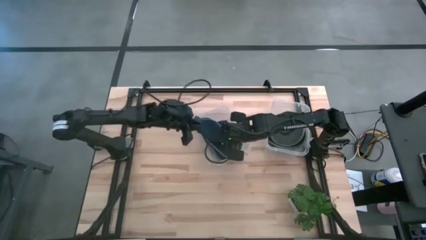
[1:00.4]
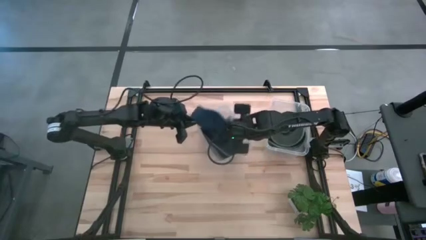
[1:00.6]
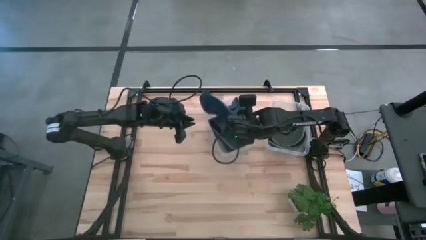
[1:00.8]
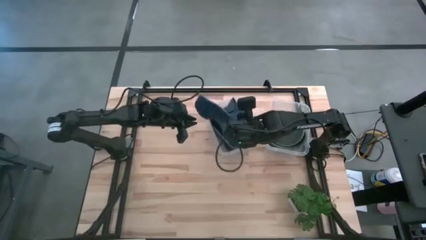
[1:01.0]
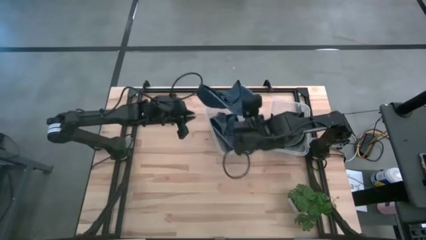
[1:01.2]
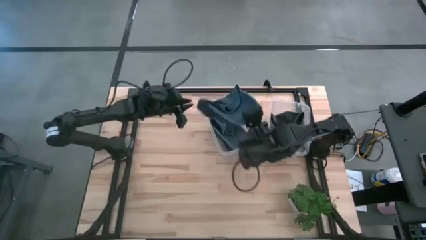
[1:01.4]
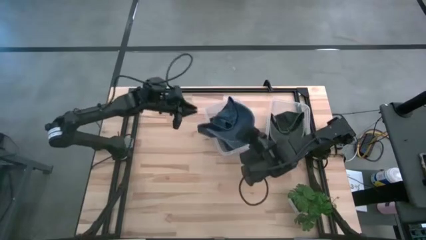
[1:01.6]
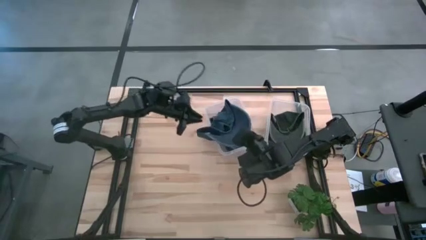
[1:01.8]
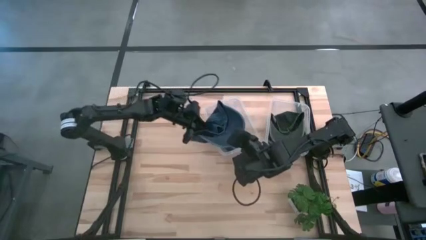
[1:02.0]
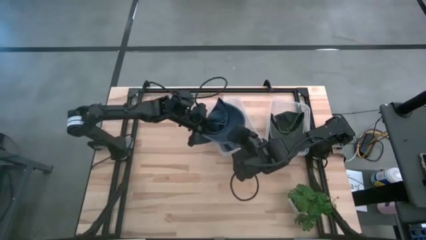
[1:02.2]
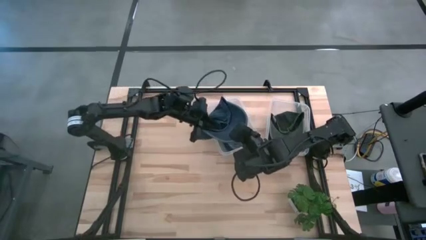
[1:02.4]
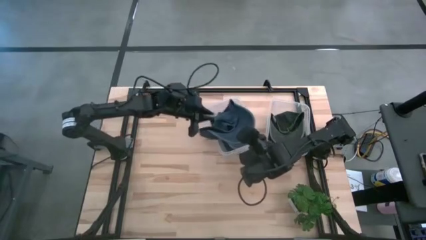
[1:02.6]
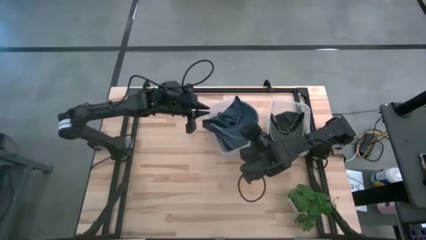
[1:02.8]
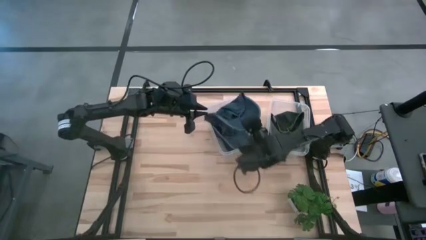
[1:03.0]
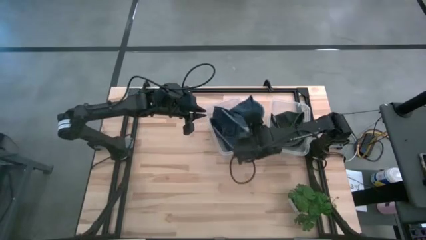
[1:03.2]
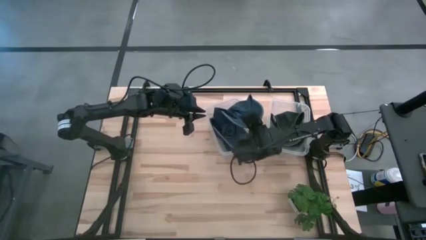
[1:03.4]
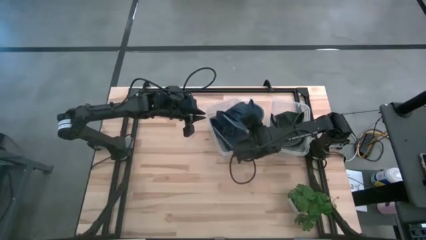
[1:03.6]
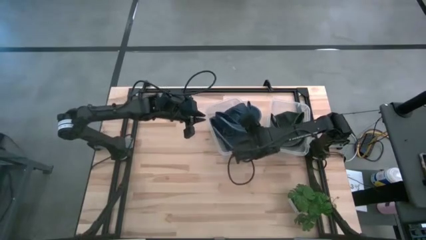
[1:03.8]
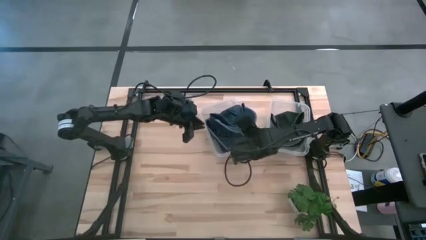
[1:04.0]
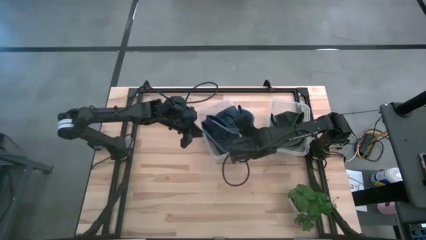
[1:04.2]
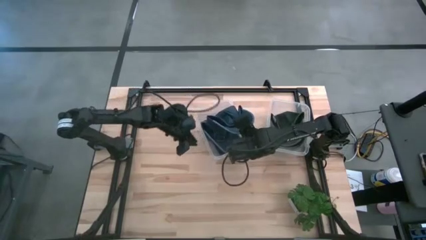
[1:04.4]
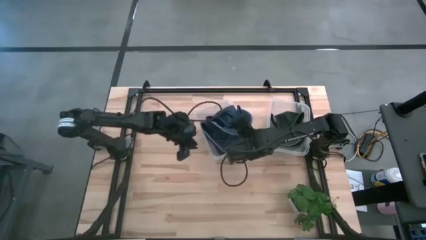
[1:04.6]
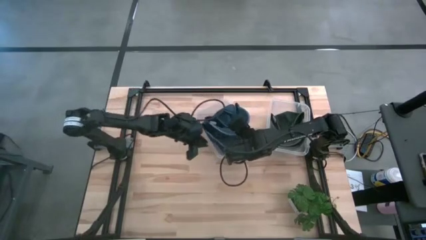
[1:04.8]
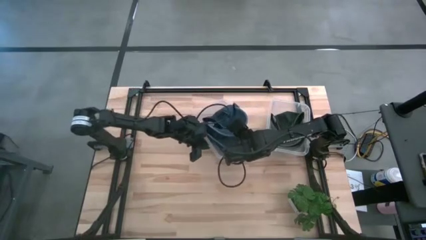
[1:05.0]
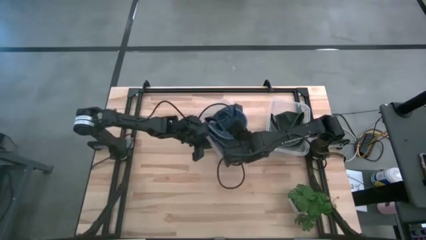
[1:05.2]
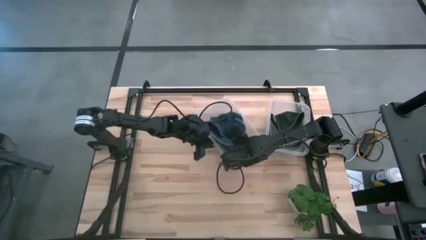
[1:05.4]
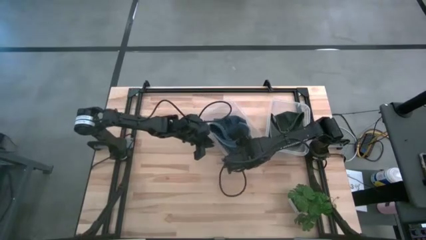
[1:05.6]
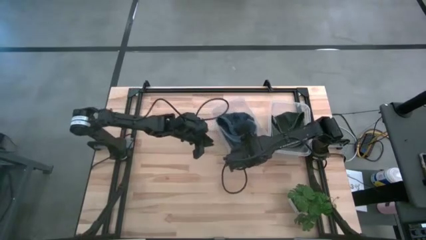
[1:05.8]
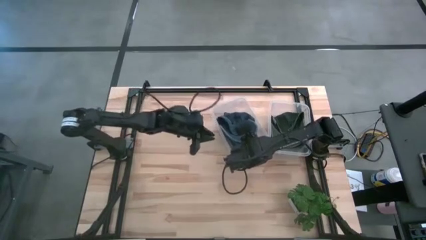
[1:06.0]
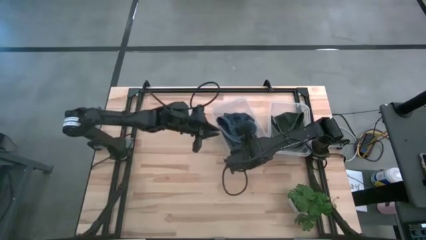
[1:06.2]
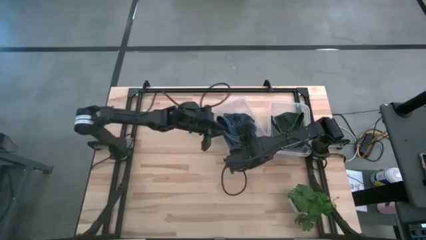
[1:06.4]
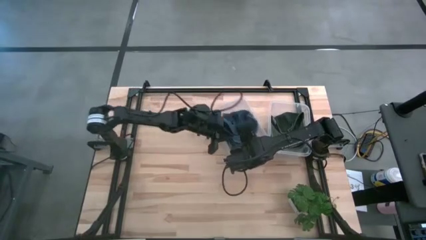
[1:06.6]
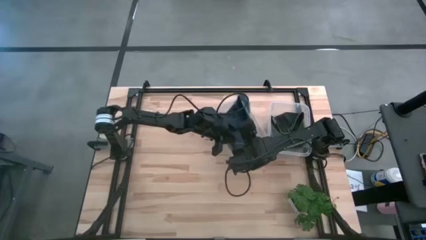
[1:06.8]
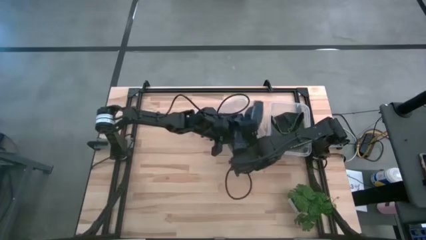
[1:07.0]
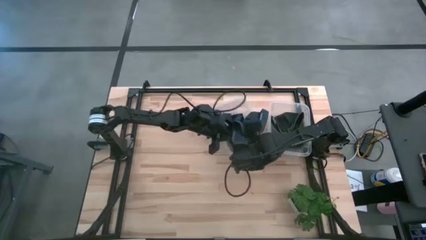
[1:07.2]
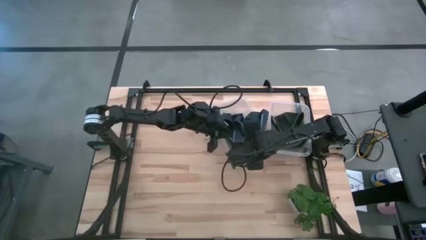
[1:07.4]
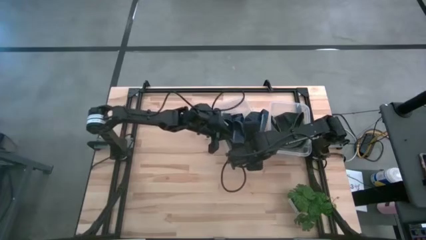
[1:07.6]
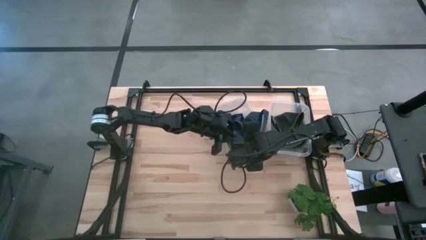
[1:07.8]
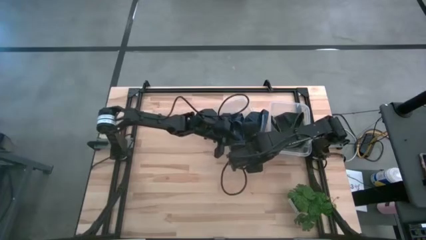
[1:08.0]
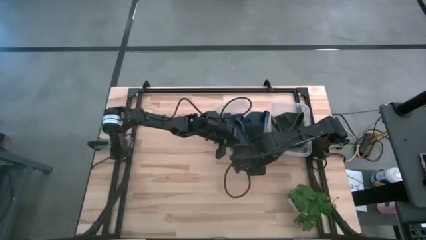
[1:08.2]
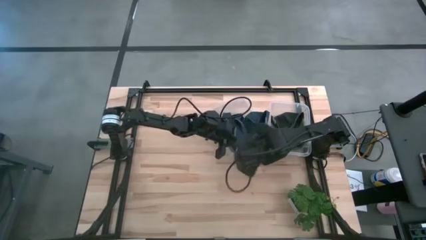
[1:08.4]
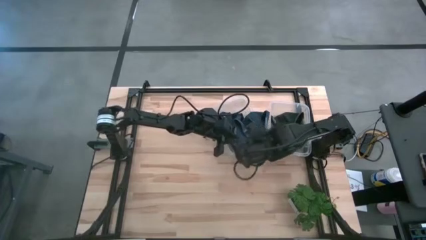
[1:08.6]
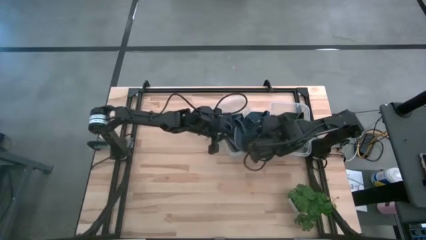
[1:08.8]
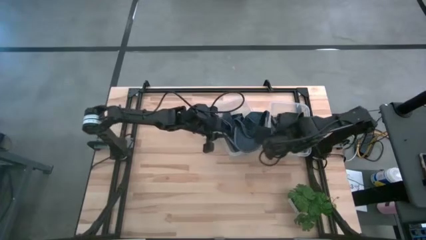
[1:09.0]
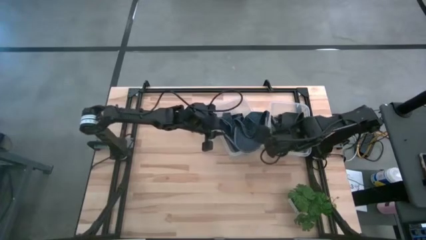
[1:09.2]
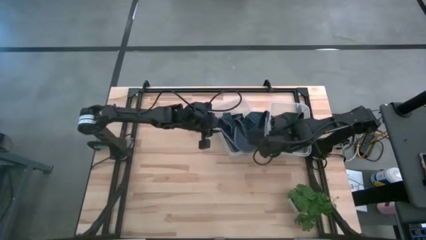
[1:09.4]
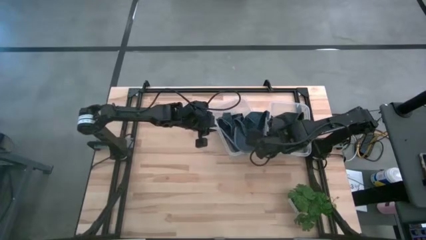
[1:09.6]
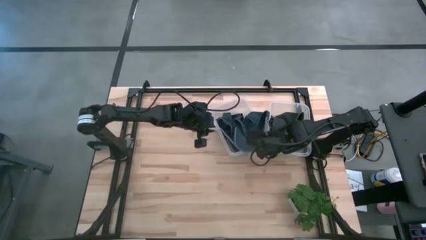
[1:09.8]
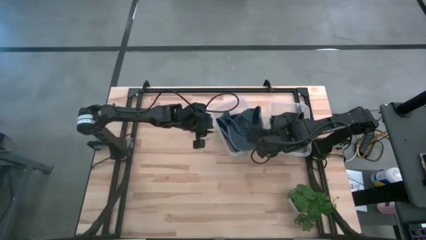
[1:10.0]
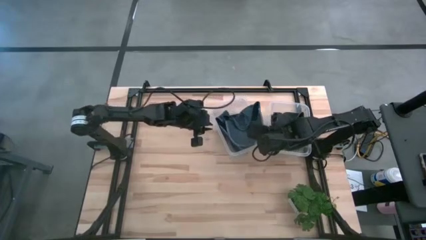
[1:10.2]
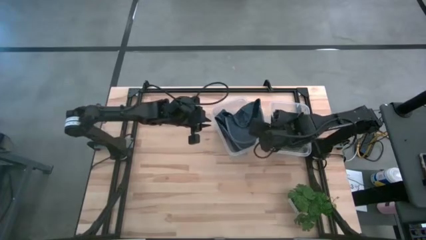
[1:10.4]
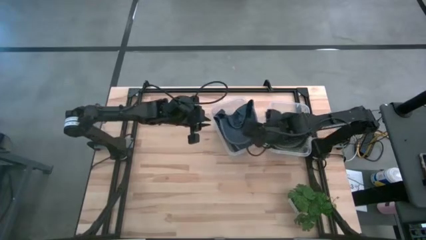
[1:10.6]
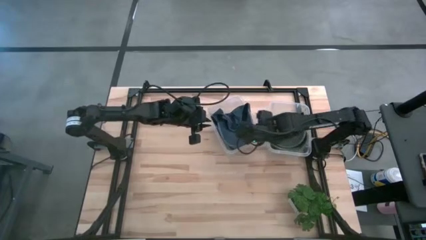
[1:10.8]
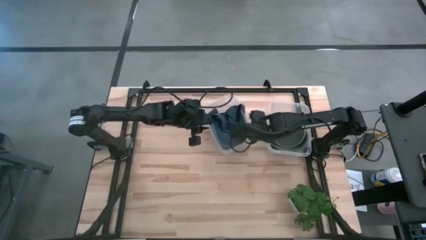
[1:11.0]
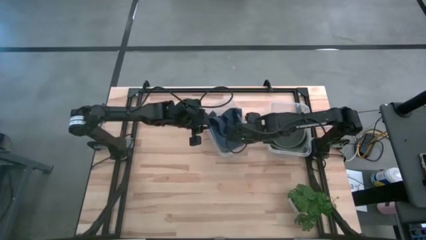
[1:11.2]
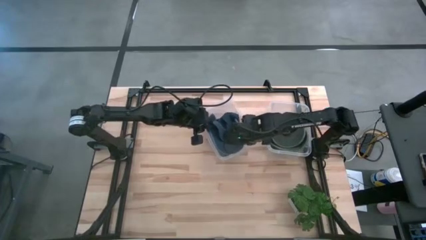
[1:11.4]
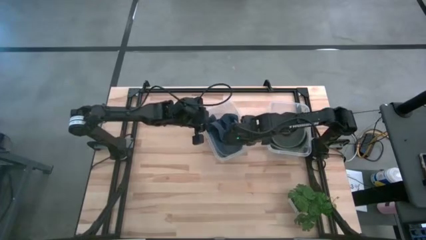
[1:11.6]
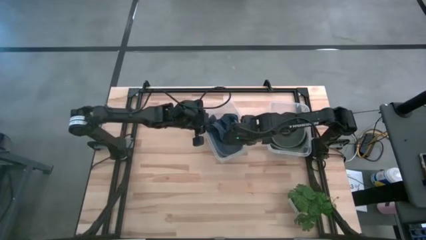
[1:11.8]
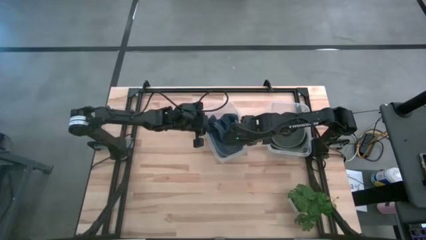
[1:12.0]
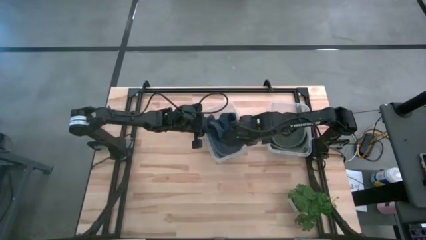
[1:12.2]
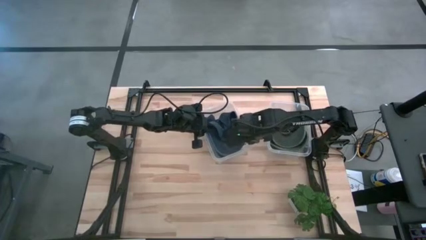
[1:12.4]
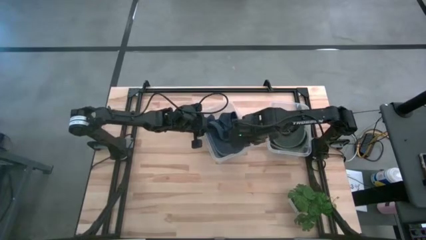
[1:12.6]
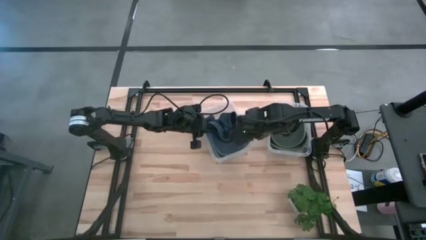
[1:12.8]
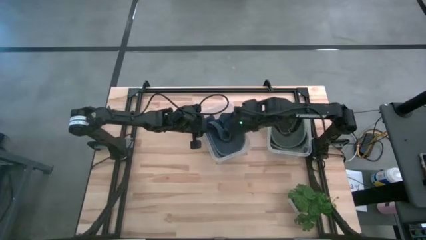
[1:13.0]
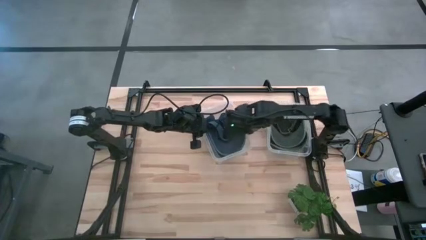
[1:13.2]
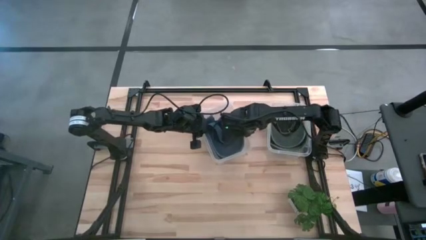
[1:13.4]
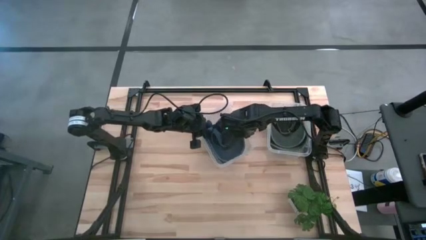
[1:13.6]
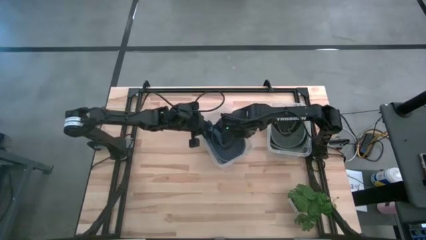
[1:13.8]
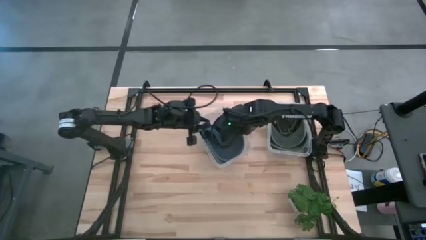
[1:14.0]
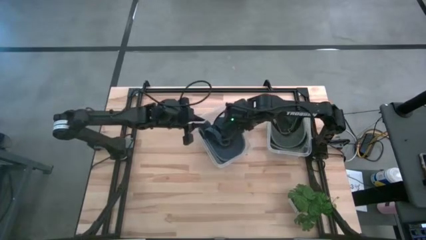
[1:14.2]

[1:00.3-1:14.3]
Task: Pick & Place hat
Put the blue cap into the left transparent bin

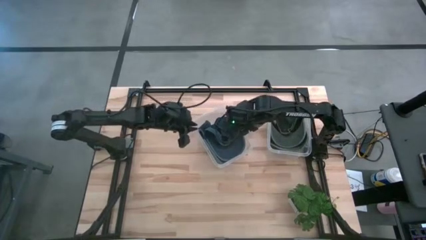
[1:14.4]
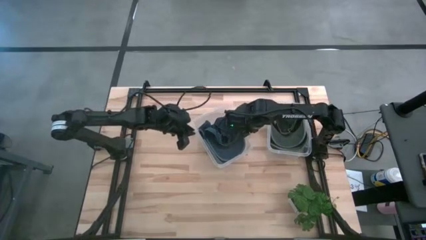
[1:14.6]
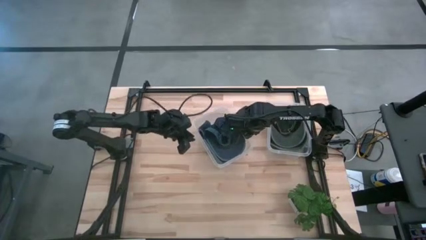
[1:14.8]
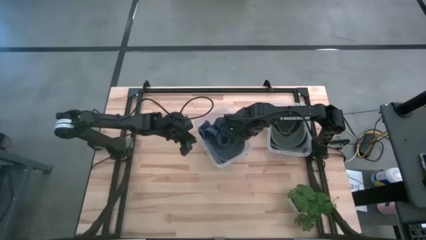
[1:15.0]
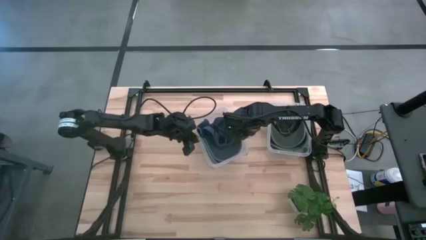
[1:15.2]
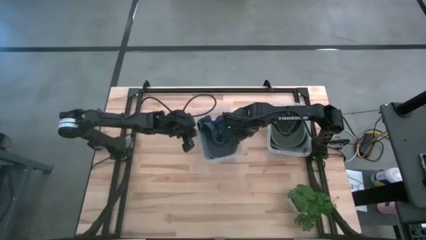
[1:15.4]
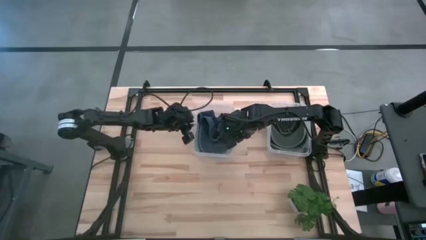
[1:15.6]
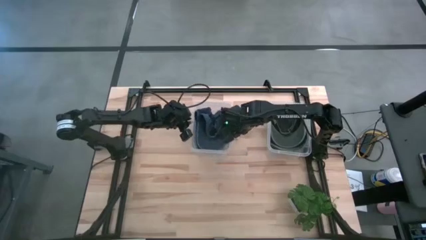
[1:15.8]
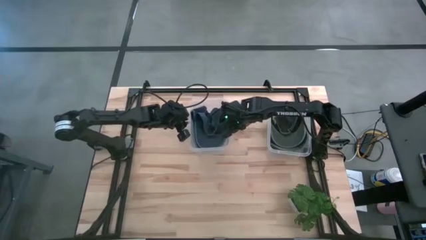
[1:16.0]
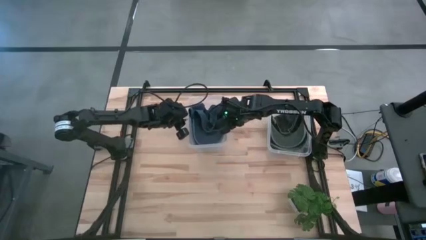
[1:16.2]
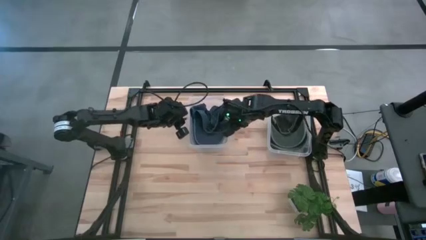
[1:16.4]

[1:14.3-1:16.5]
Adjust the left transparent bin on the table
